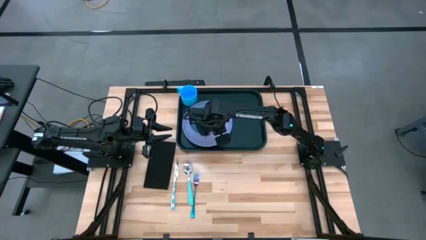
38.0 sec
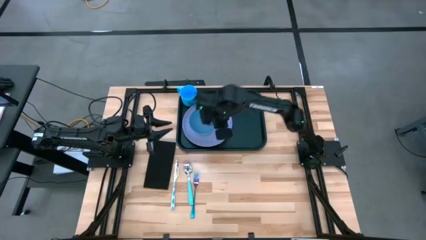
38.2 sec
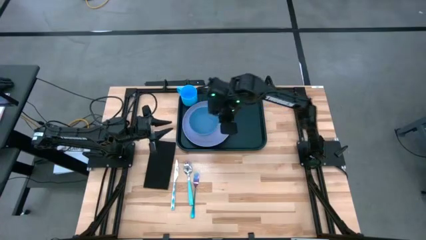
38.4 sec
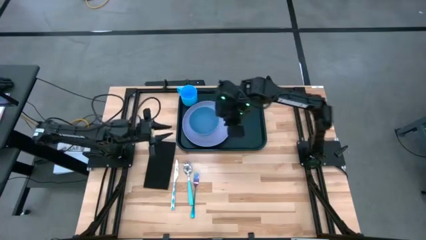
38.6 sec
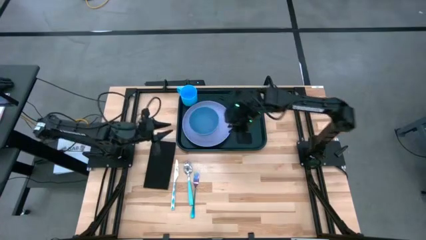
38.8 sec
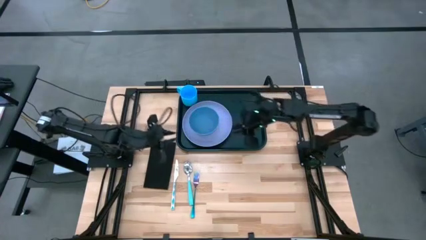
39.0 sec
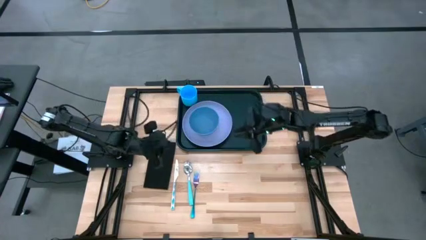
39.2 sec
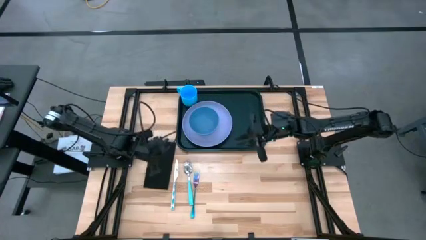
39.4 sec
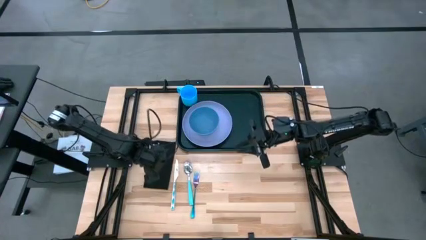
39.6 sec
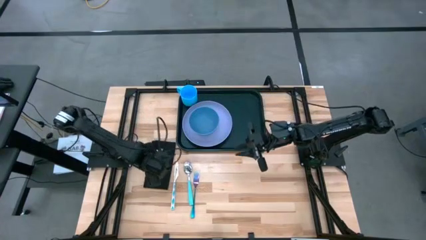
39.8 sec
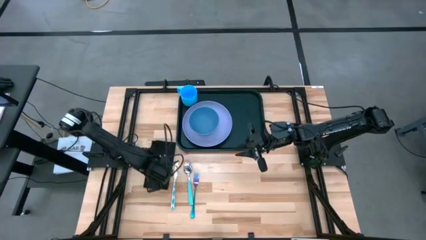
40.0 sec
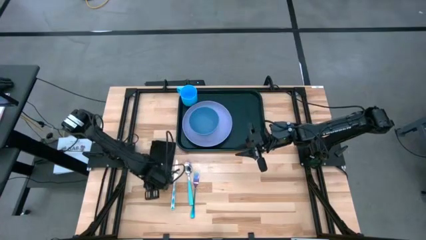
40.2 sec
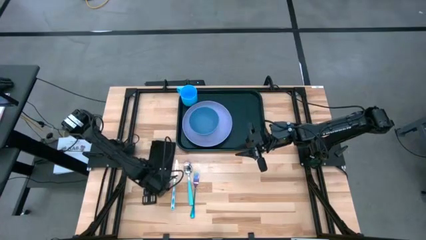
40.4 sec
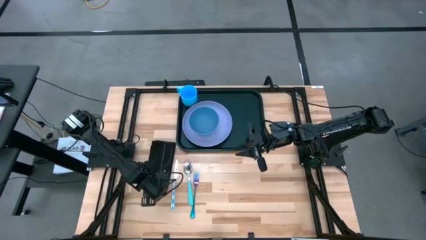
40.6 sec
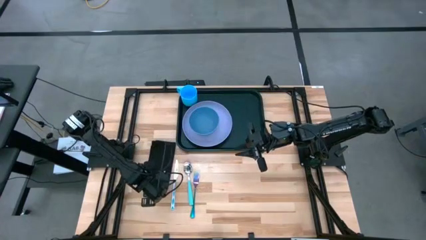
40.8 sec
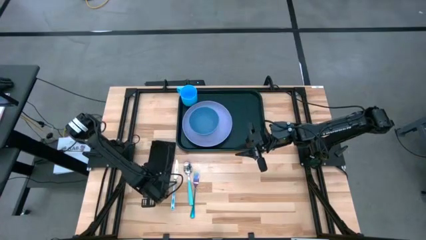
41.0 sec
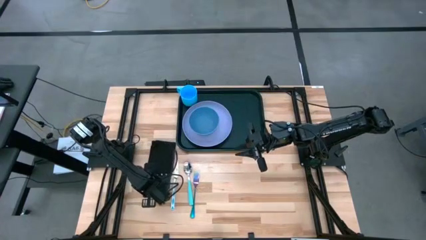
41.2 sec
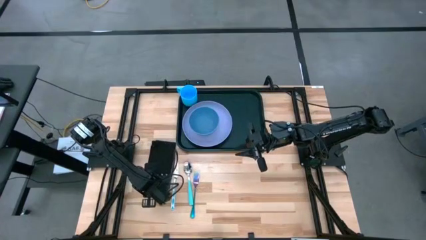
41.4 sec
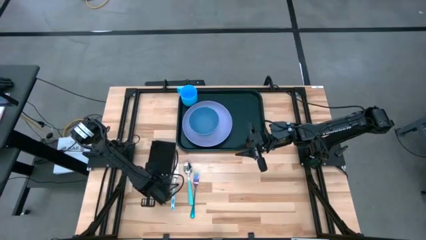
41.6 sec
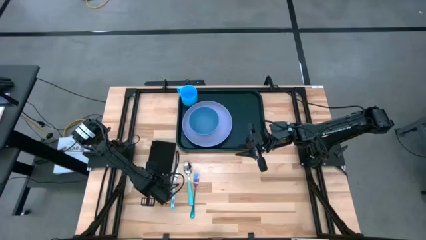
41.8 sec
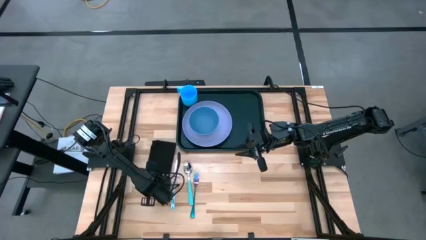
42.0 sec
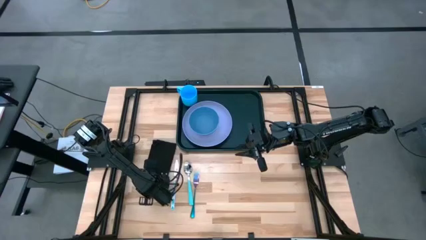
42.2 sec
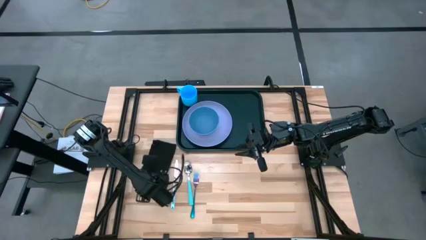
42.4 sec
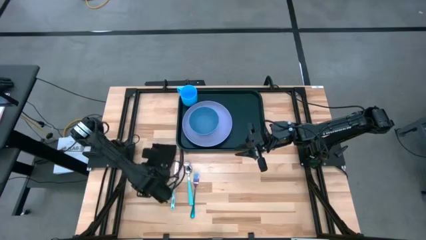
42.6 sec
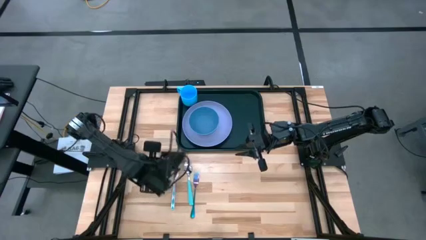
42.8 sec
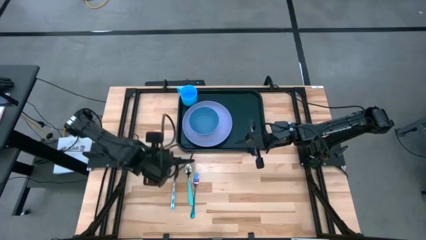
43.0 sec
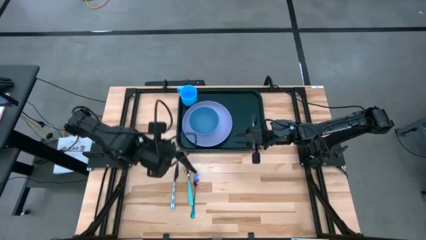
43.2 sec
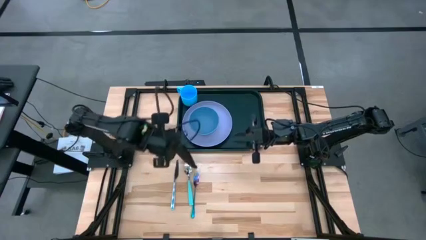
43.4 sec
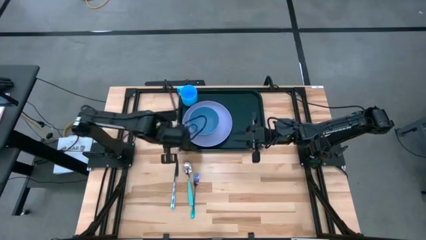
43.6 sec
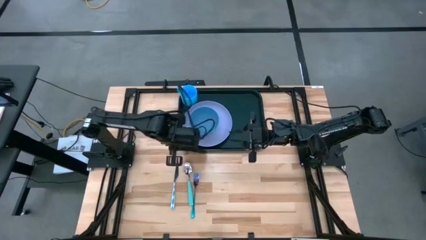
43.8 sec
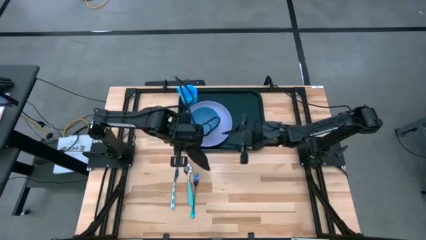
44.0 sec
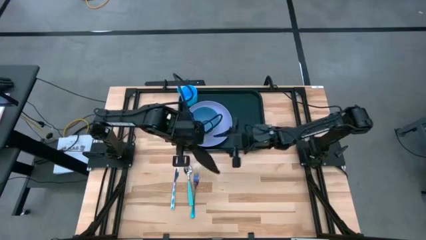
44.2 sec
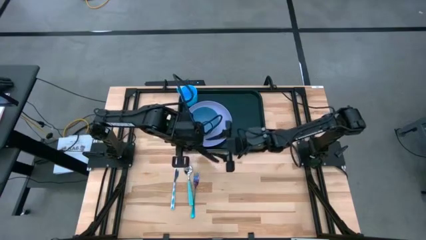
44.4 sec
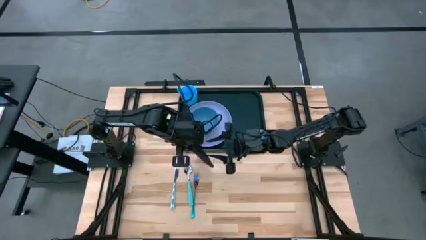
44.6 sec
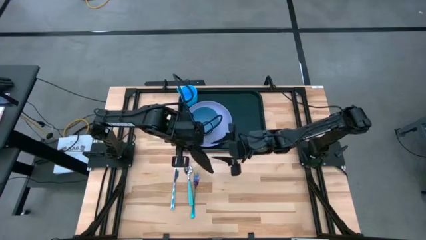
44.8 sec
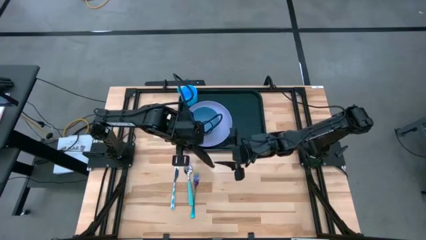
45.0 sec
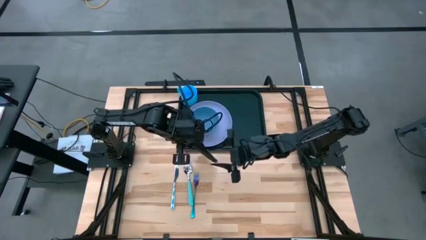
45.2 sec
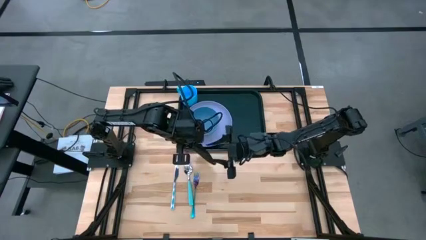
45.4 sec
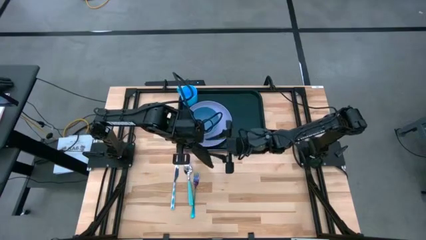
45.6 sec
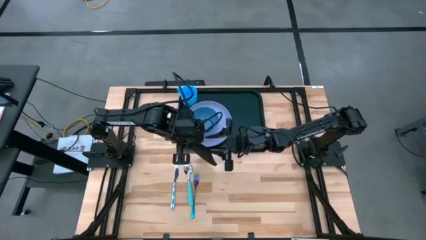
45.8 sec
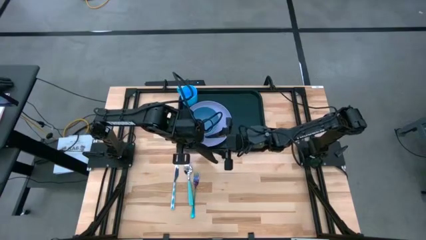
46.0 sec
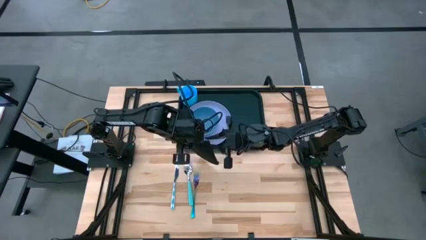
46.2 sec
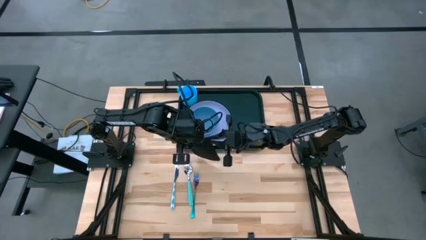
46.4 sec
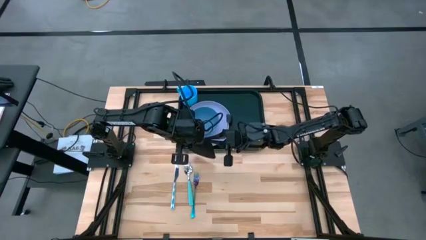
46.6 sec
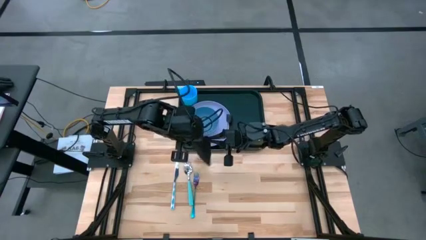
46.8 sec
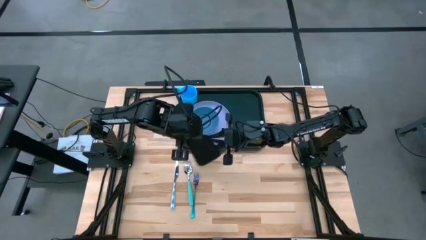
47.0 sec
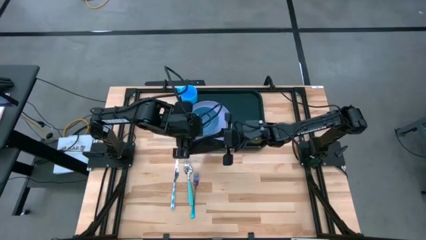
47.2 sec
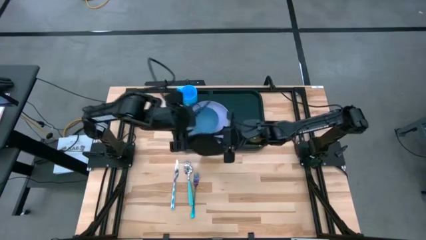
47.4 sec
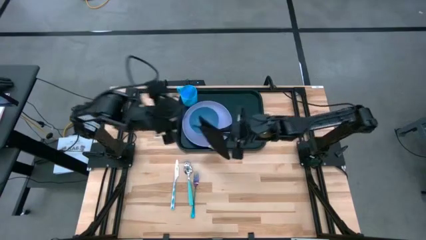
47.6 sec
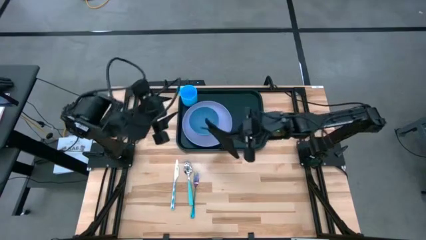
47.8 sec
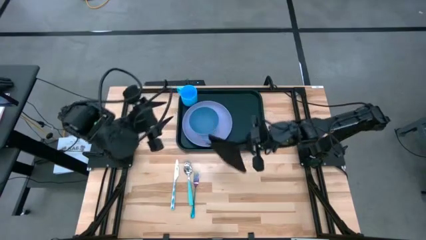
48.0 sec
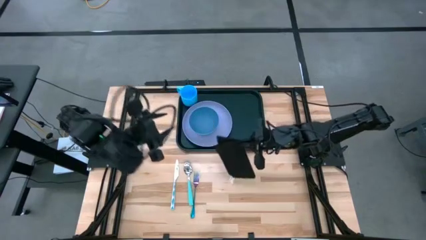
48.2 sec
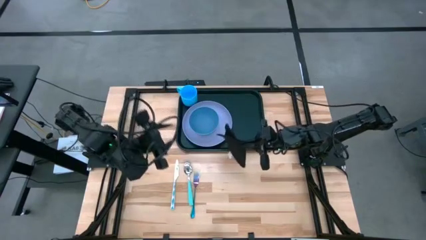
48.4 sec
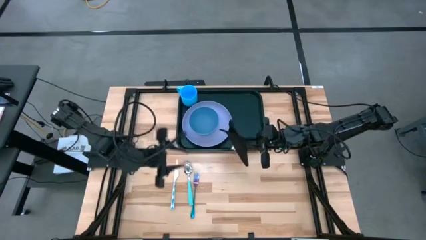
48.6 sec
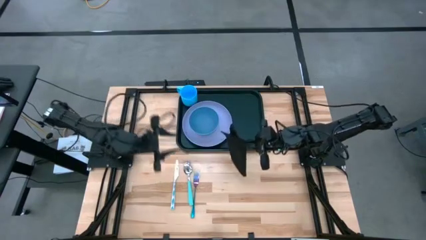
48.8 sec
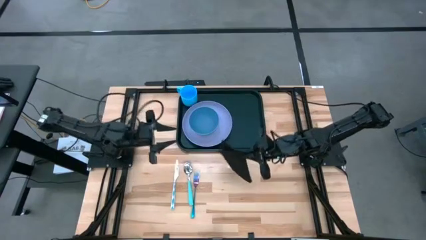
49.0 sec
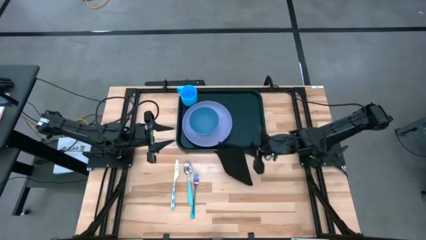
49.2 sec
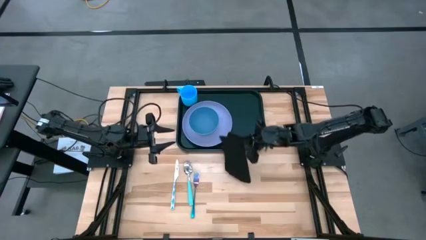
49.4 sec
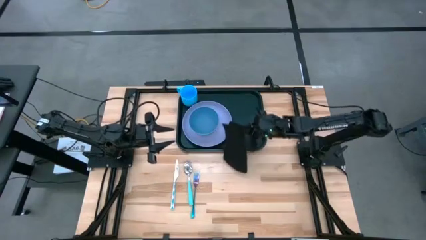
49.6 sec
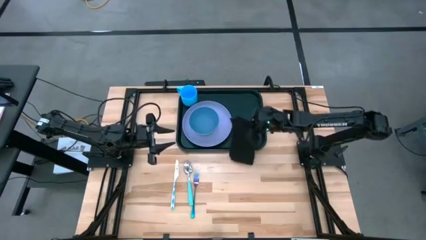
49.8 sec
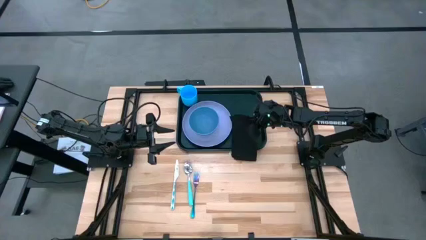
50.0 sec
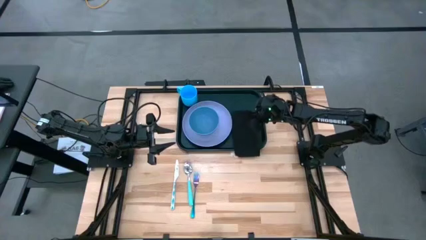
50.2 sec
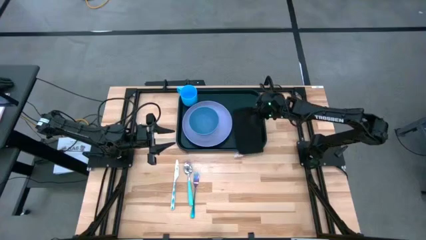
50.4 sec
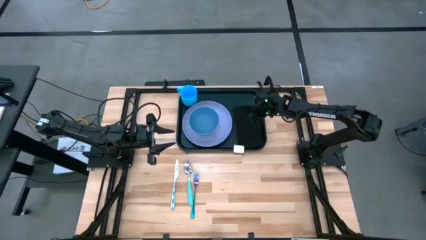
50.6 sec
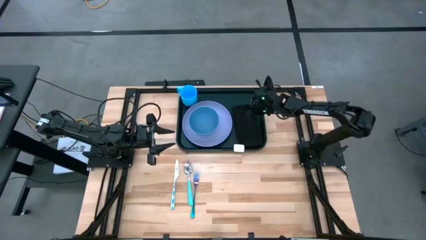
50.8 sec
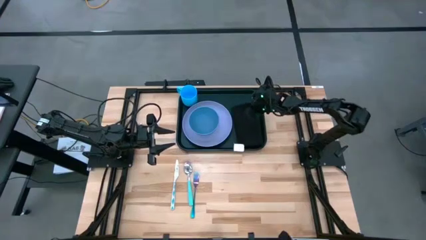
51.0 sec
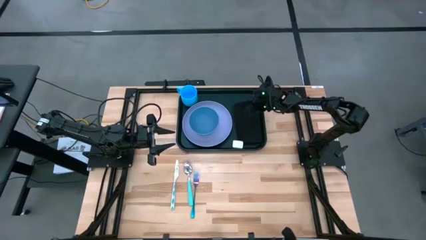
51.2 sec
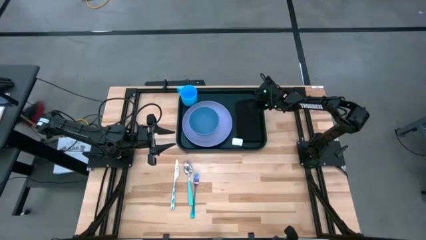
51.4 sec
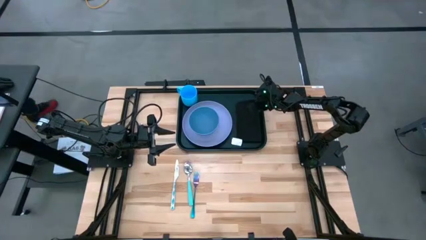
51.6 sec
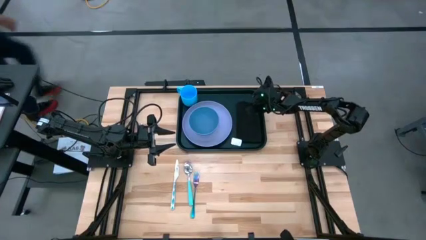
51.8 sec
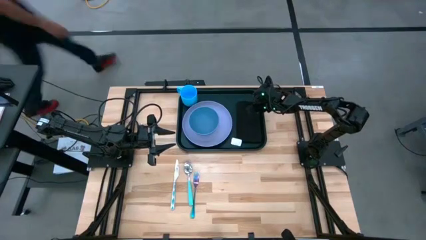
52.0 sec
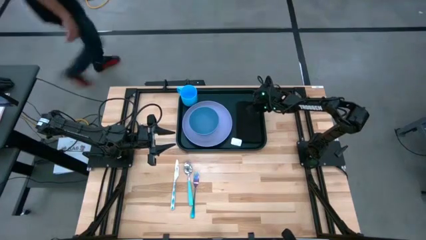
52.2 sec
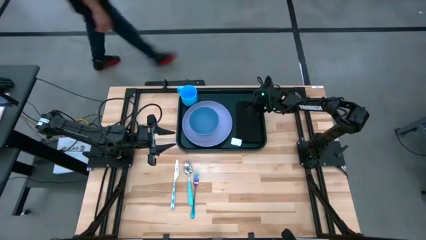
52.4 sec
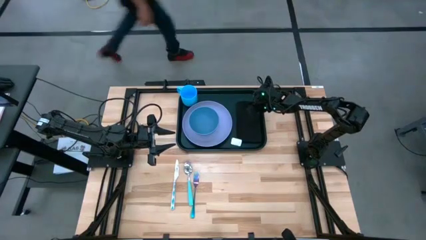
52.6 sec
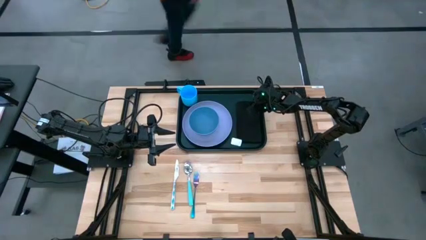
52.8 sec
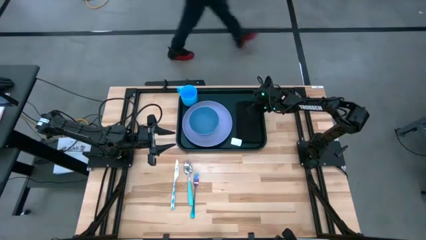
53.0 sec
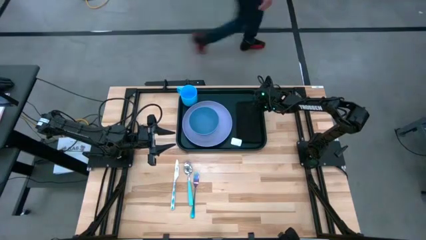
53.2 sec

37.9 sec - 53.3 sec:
Task: Set up tray
Put the black napkin beside of the purple plate on the tray
